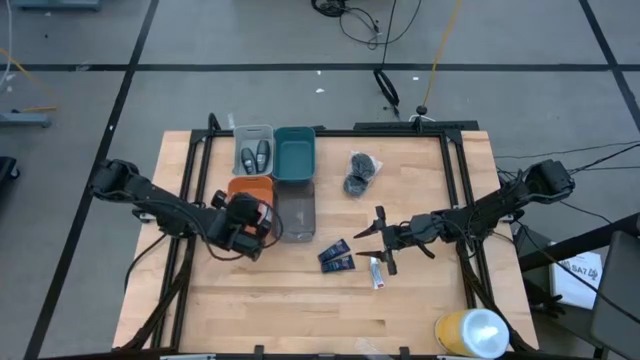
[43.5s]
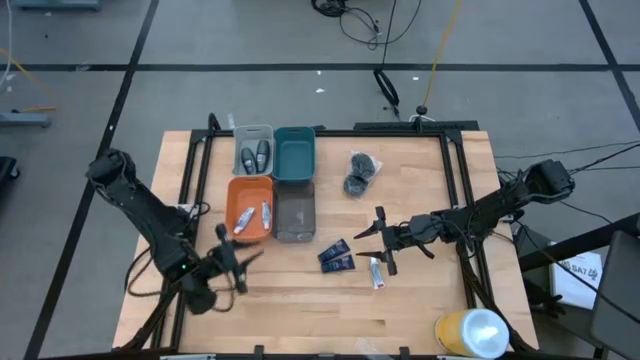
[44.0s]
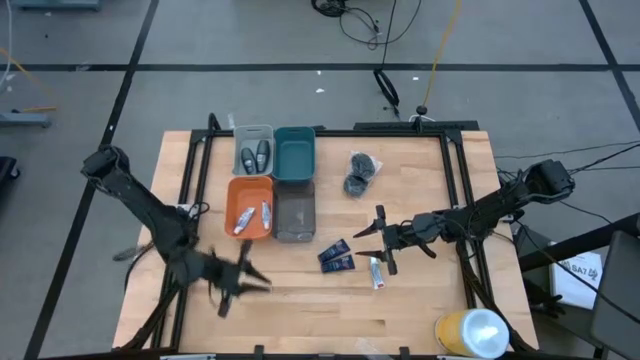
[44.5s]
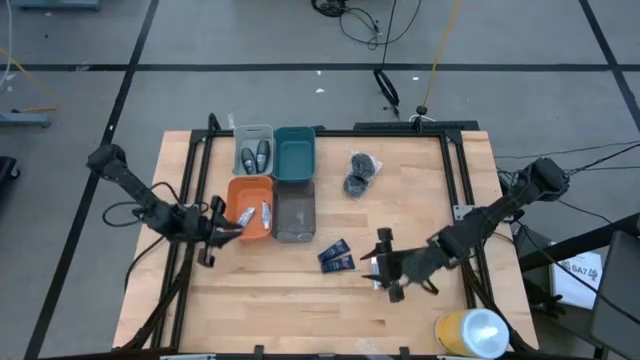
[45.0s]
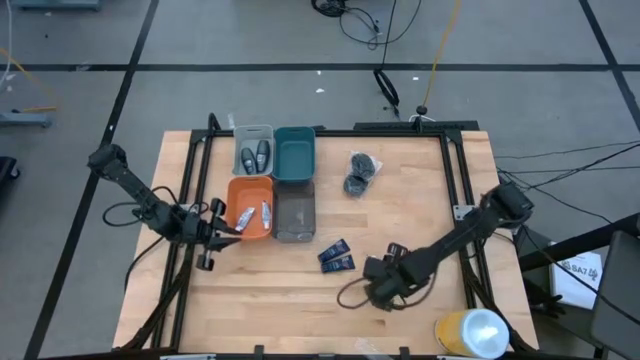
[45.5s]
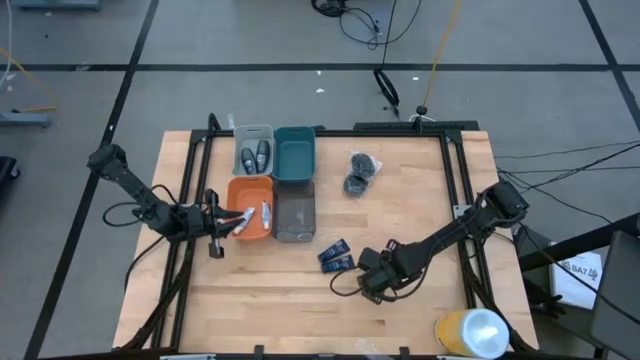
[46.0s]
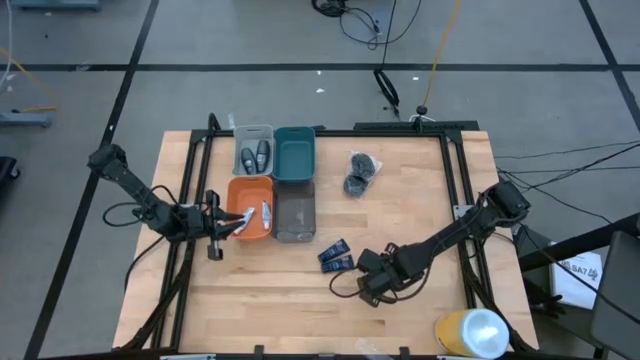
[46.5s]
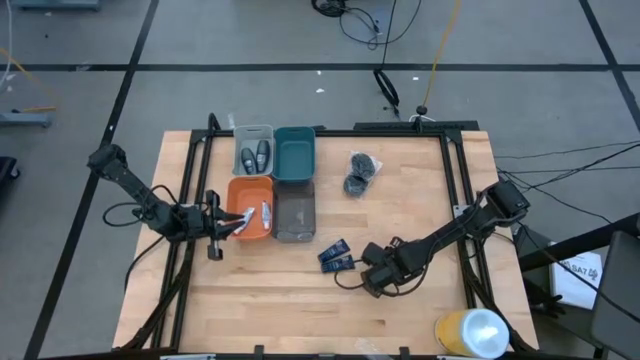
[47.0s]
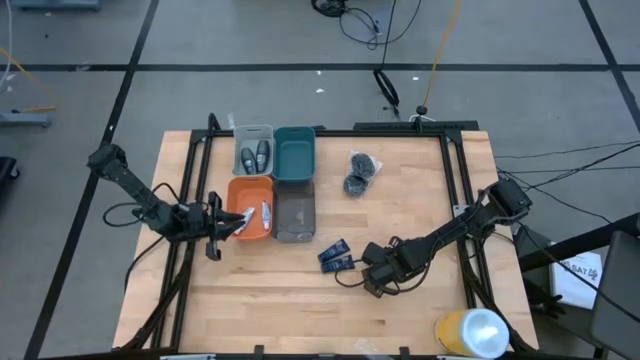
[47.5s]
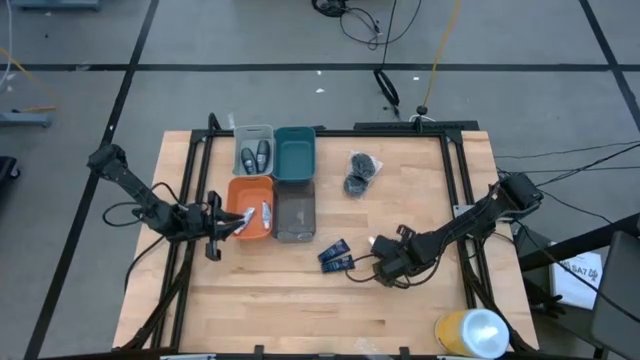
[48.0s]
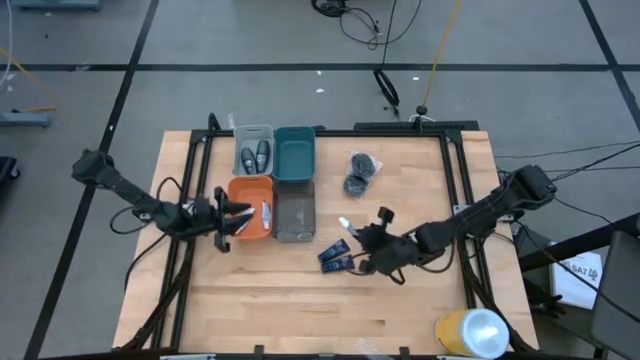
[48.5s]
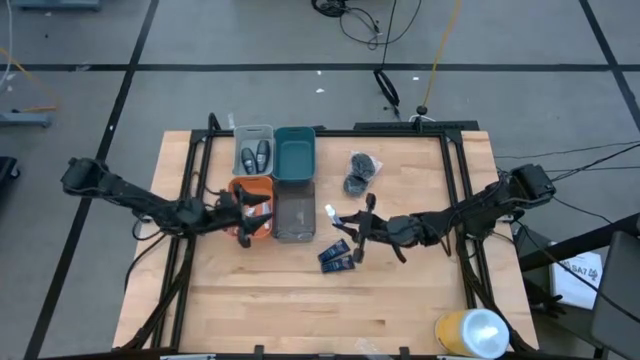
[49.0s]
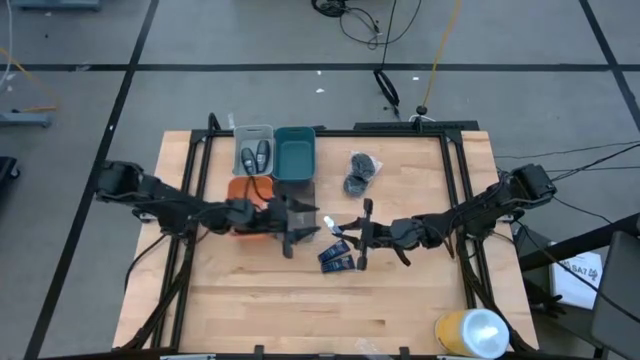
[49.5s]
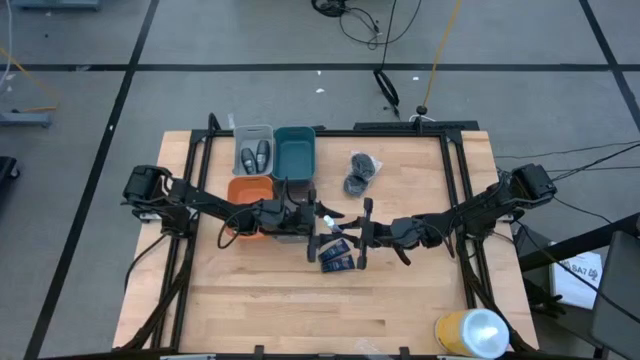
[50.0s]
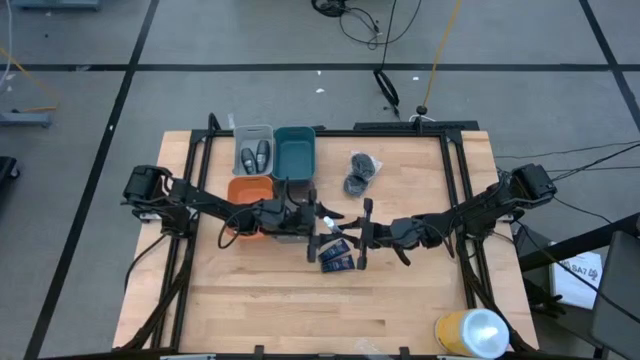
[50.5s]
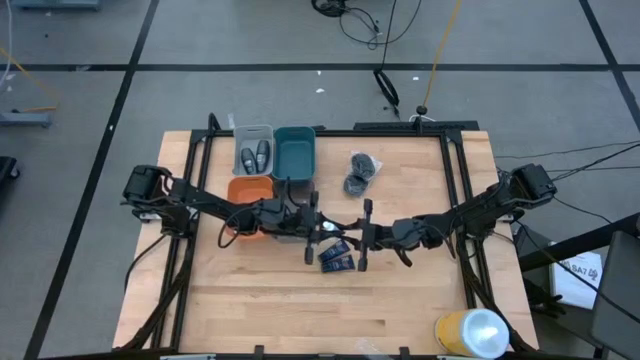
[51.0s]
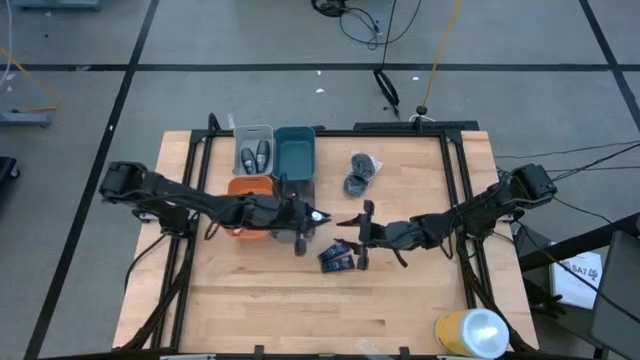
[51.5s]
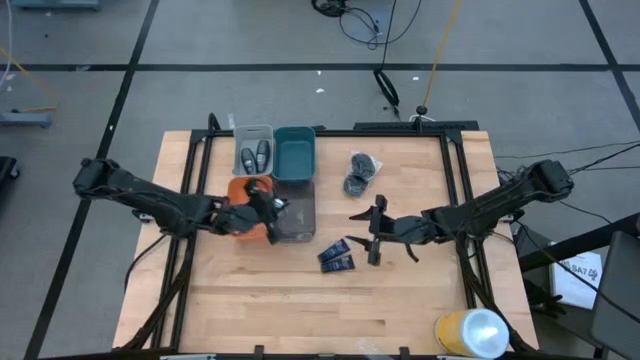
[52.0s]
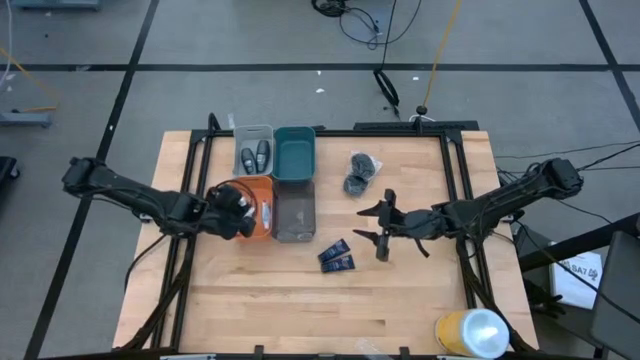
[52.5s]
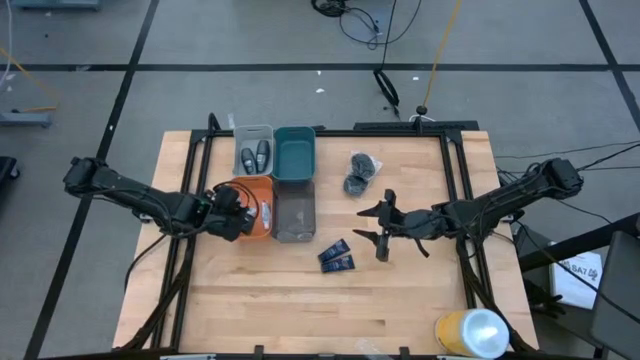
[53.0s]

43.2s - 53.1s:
Task: Pick & Place Travel size toiletries
Put the white toothpaste into the orange bin

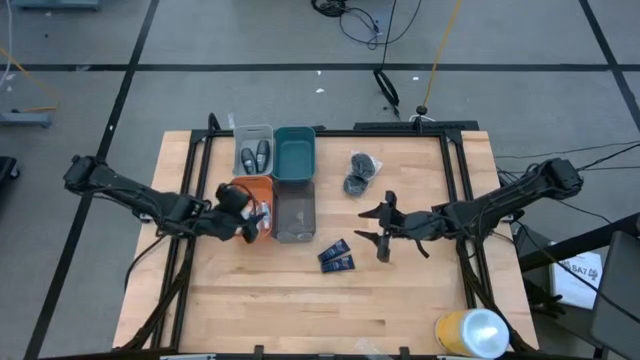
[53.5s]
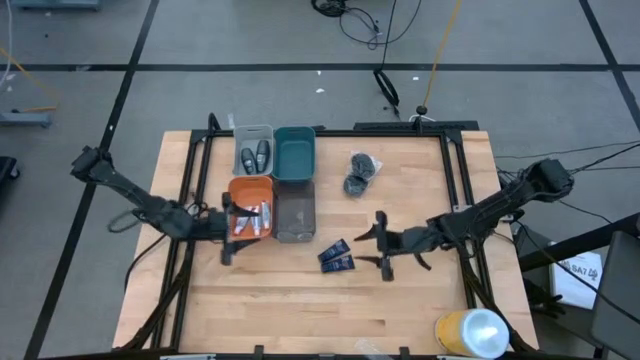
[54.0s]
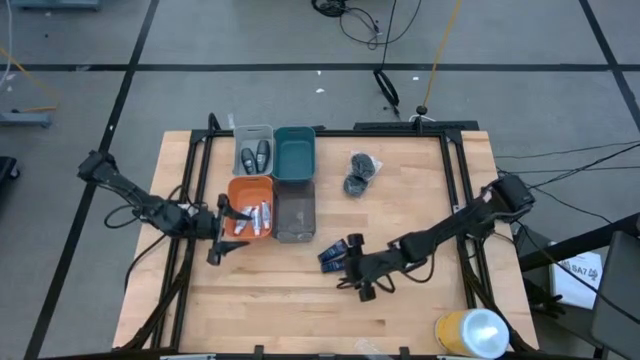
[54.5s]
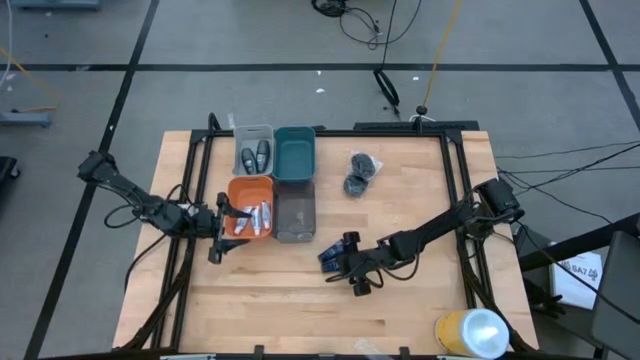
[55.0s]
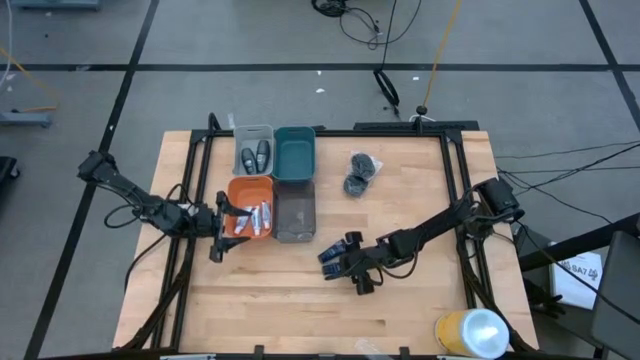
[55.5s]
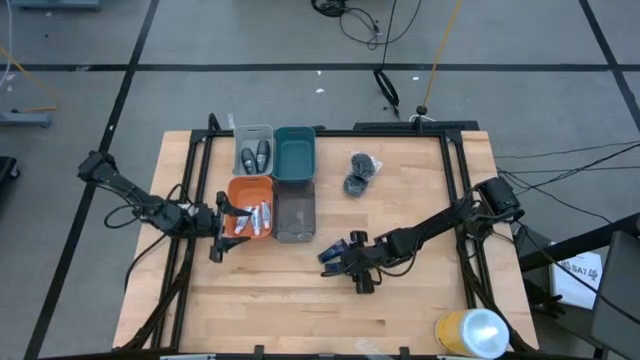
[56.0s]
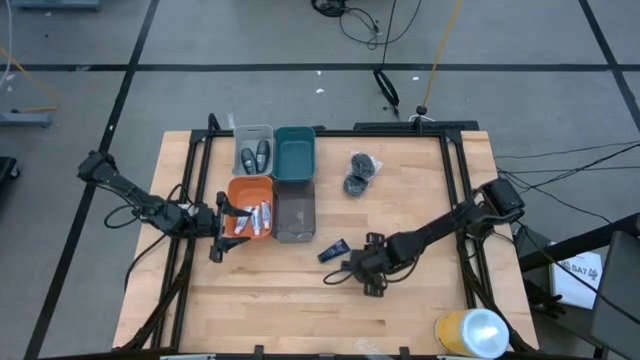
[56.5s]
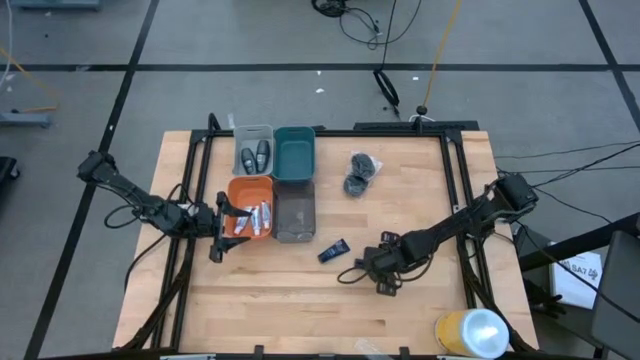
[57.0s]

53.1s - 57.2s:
Put the bottom blue shave cream into the blue bin

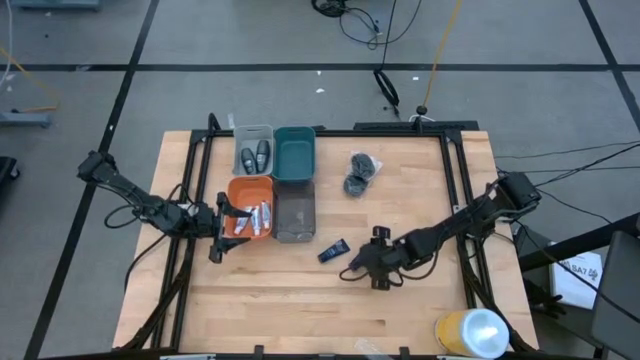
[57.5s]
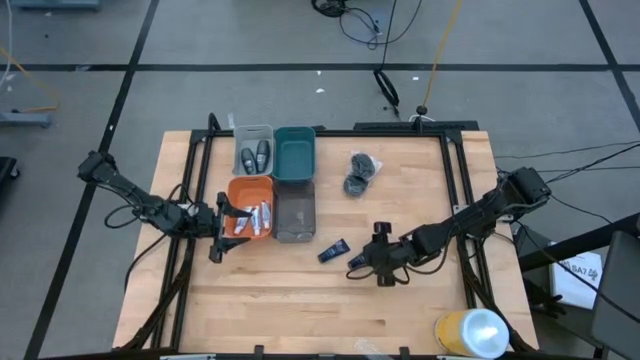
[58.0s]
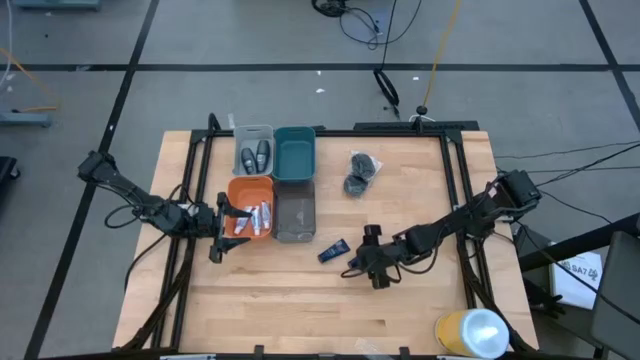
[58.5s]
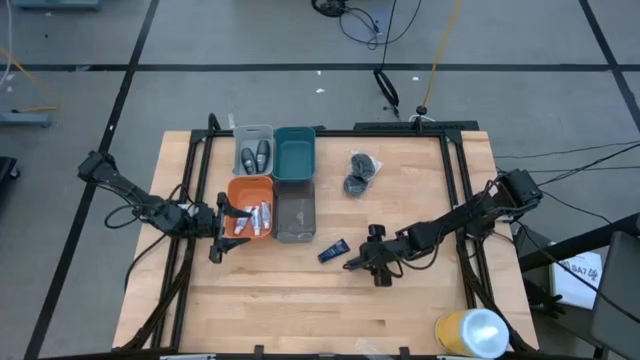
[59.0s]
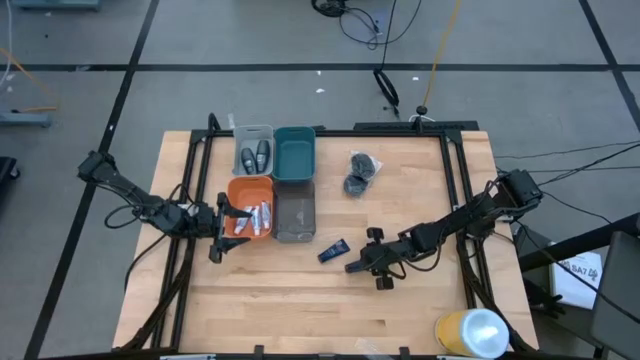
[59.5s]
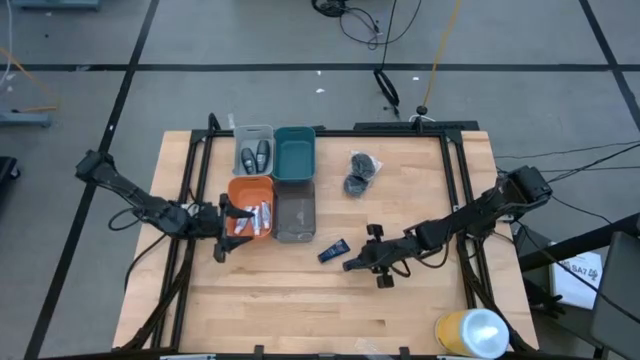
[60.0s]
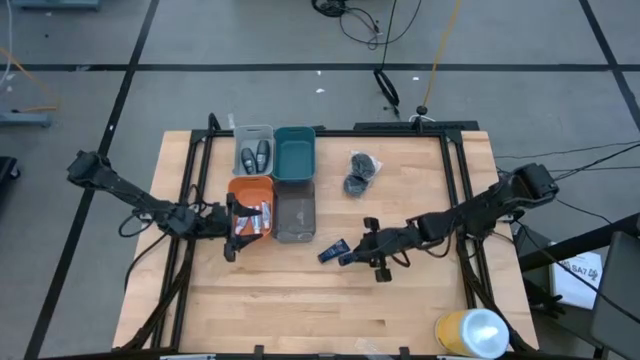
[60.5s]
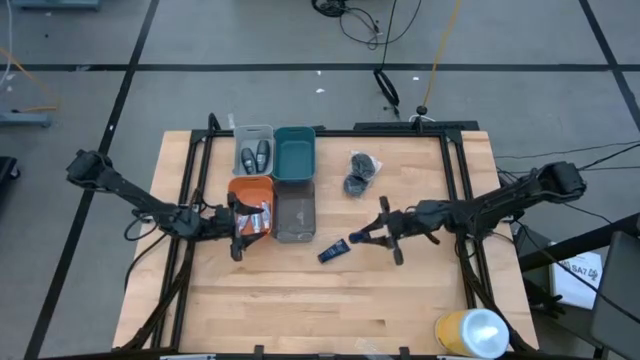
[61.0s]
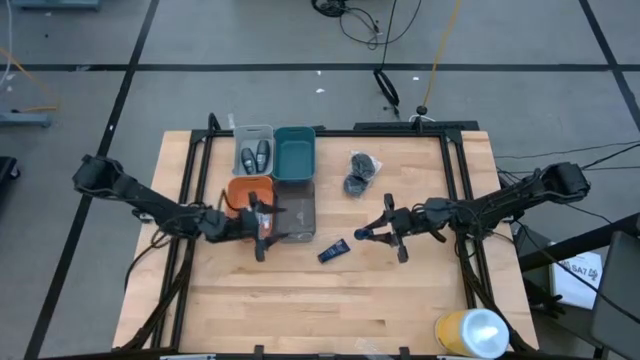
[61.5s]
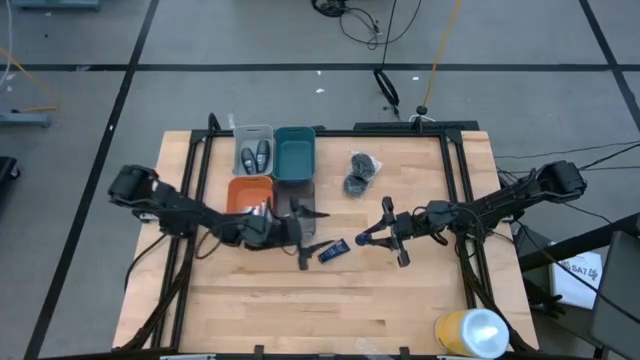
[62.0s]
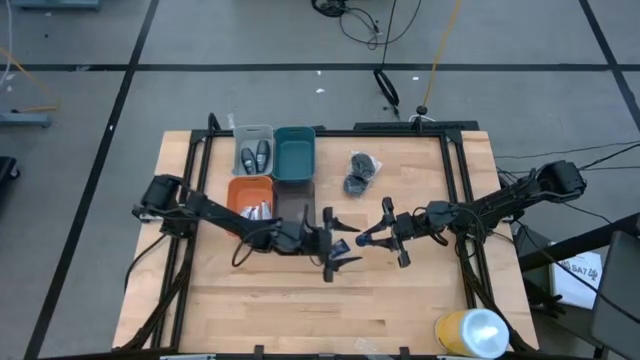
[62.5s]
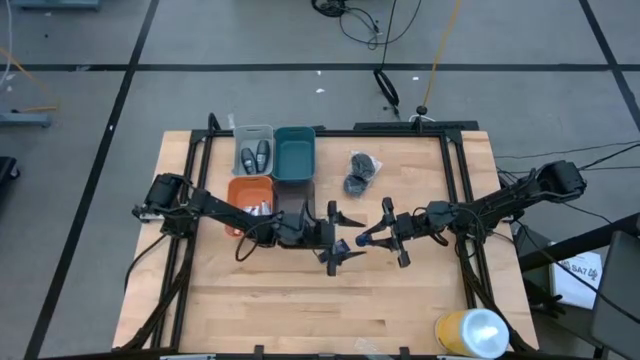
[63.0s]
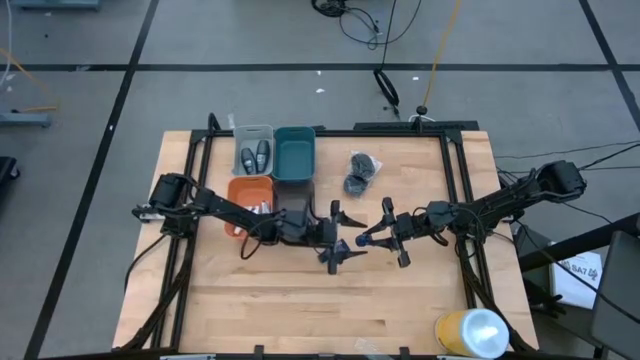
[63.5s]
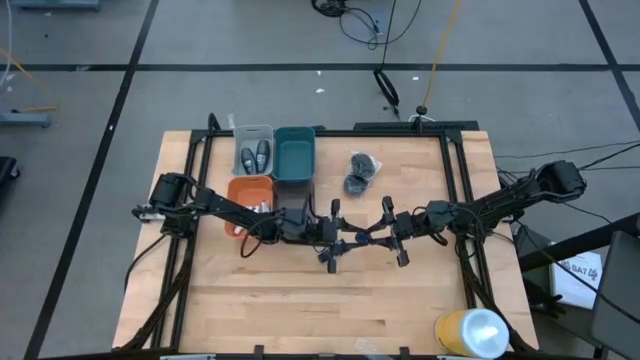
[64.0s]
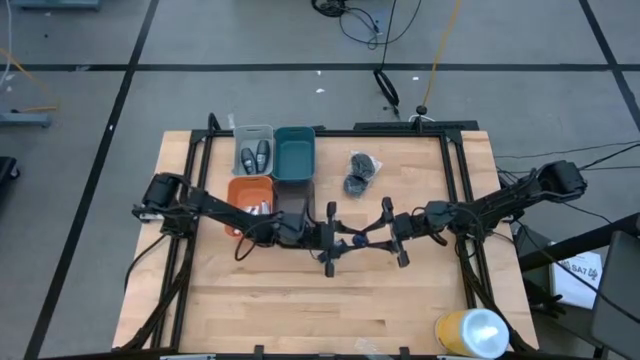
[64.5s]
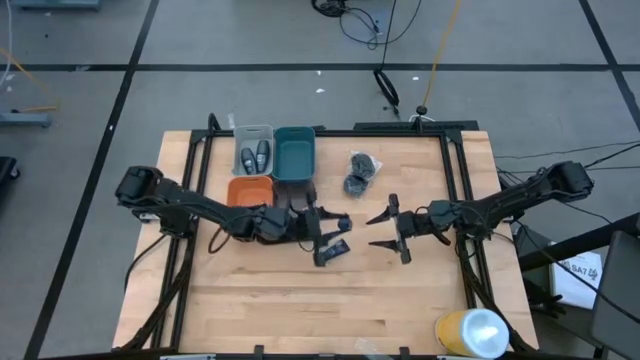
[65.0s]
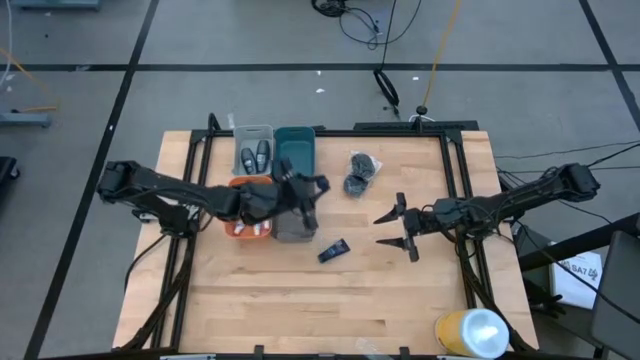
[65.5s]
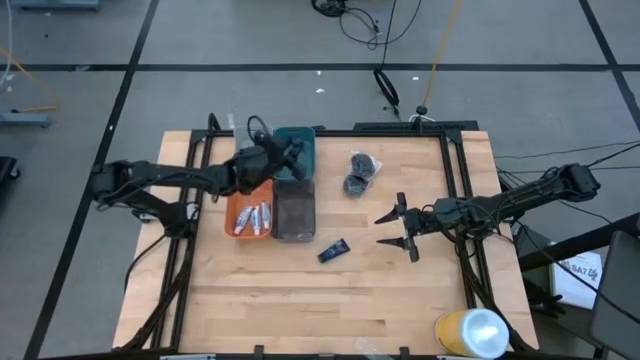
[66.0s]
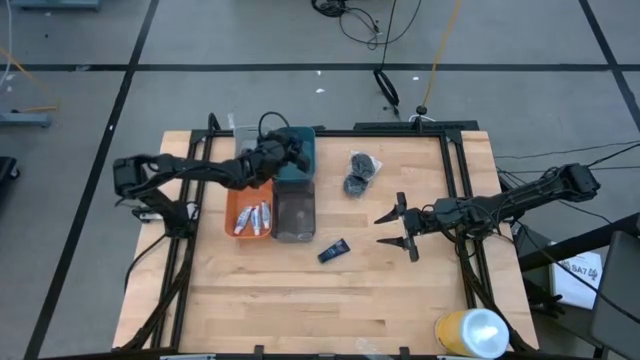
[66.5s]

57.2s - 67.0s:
Put the bottom blue shave cream into the blue bin
